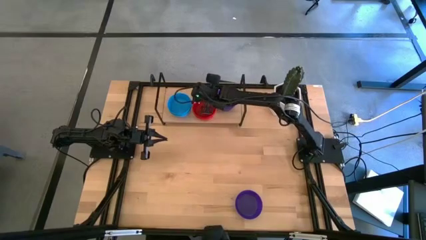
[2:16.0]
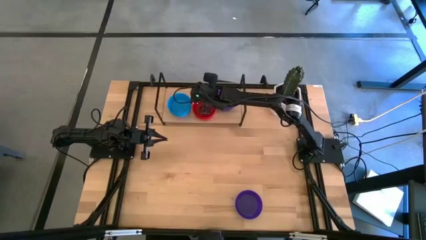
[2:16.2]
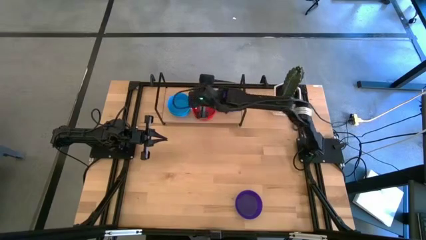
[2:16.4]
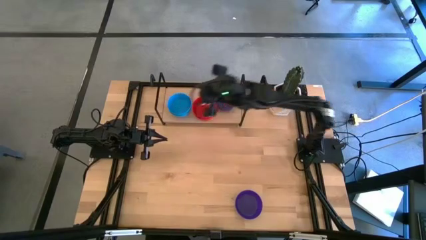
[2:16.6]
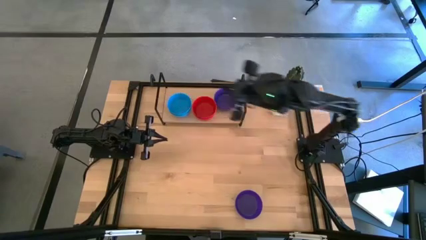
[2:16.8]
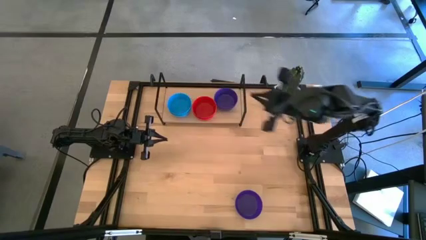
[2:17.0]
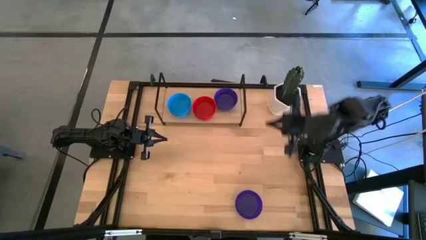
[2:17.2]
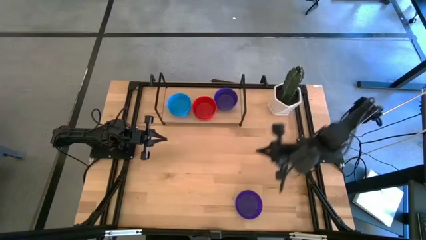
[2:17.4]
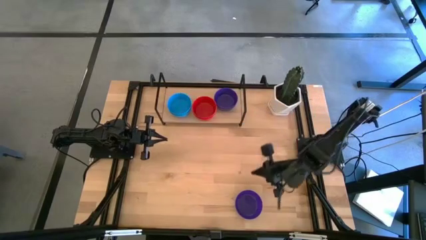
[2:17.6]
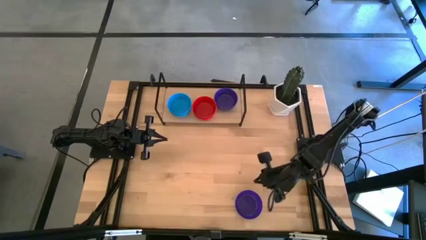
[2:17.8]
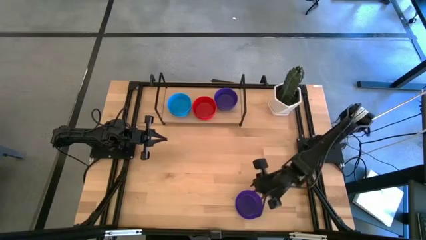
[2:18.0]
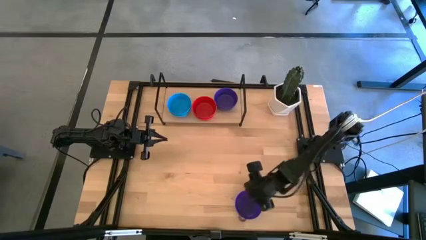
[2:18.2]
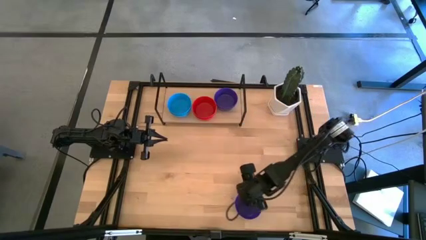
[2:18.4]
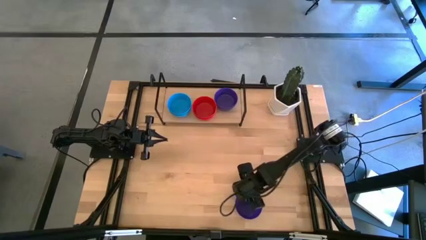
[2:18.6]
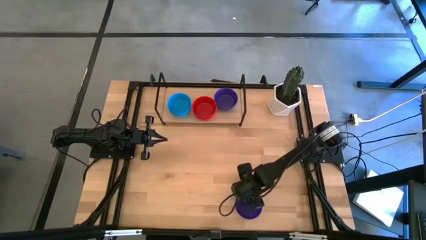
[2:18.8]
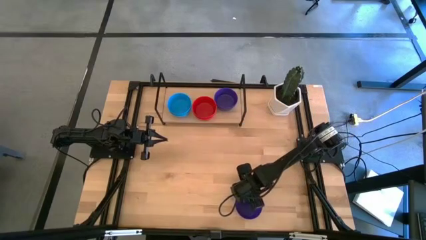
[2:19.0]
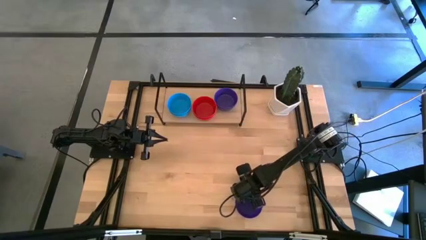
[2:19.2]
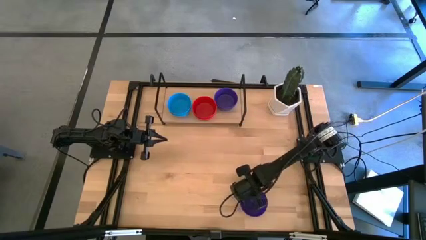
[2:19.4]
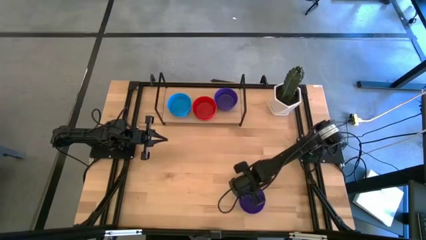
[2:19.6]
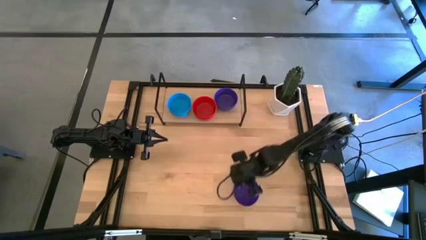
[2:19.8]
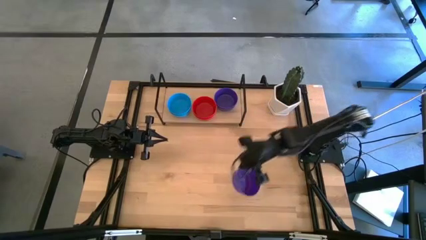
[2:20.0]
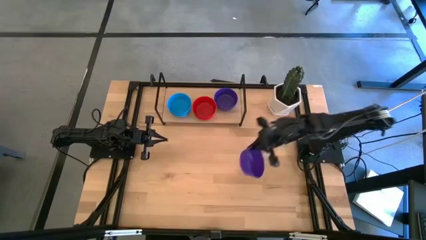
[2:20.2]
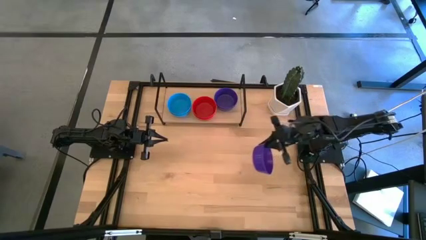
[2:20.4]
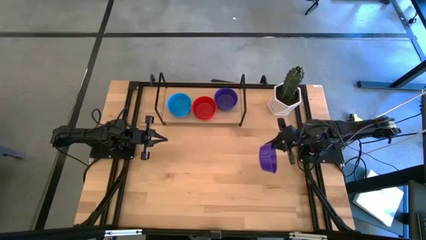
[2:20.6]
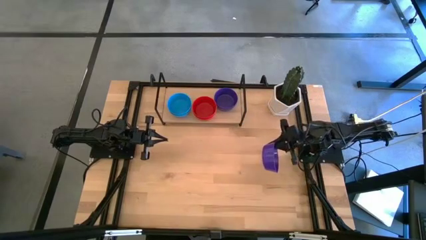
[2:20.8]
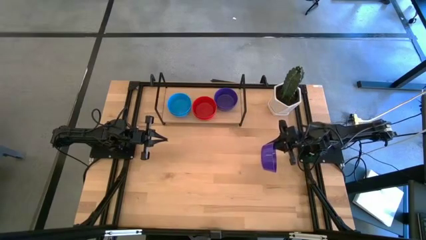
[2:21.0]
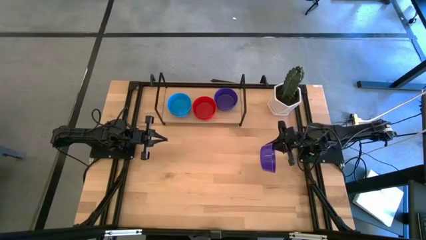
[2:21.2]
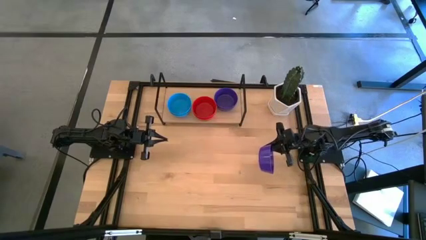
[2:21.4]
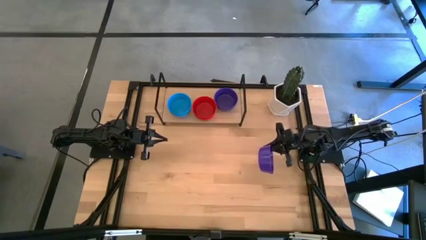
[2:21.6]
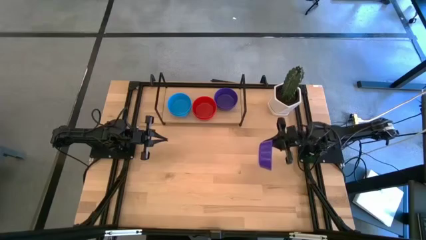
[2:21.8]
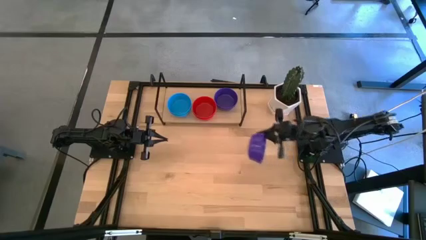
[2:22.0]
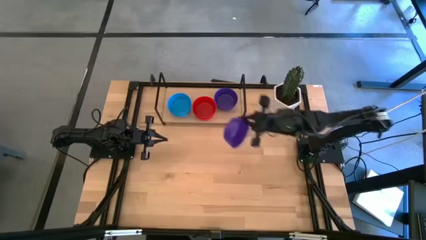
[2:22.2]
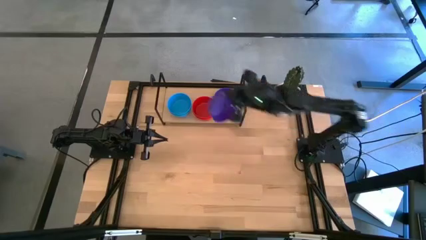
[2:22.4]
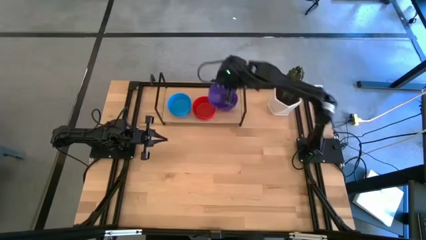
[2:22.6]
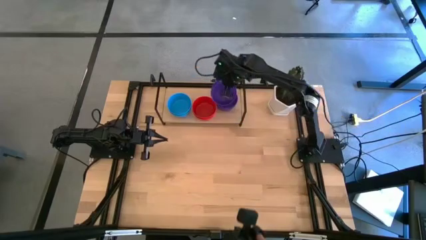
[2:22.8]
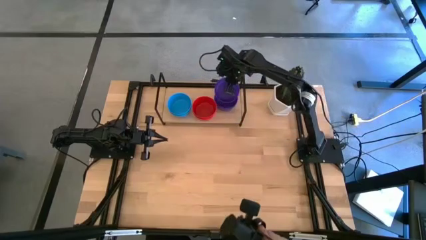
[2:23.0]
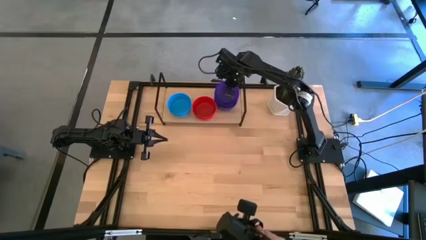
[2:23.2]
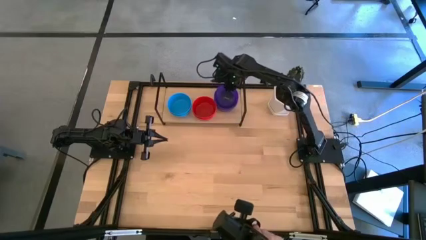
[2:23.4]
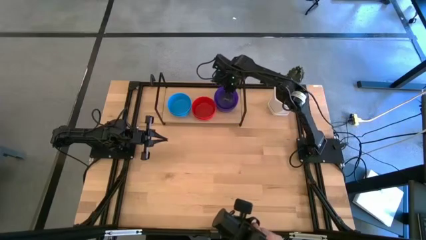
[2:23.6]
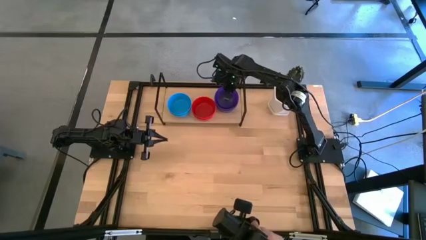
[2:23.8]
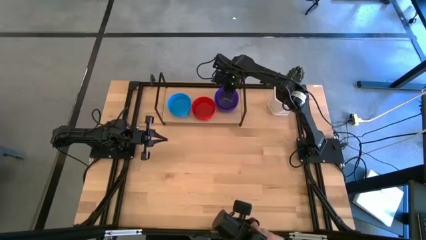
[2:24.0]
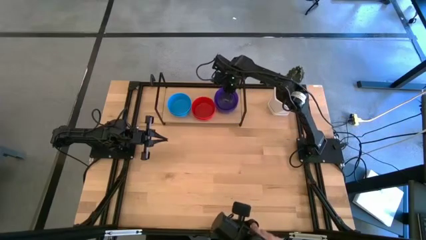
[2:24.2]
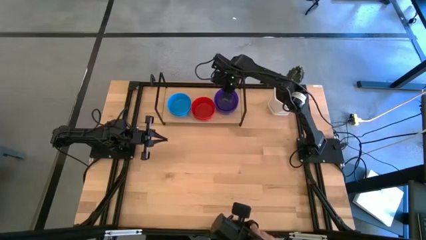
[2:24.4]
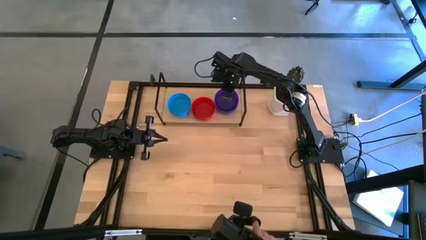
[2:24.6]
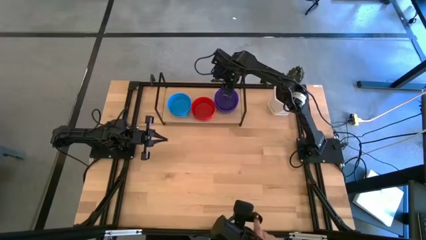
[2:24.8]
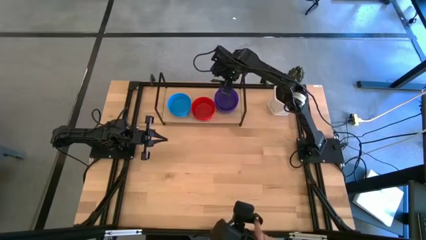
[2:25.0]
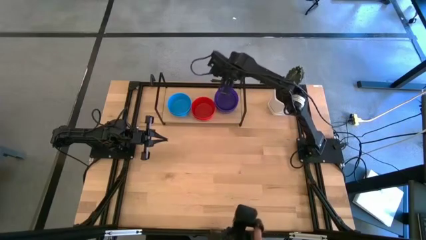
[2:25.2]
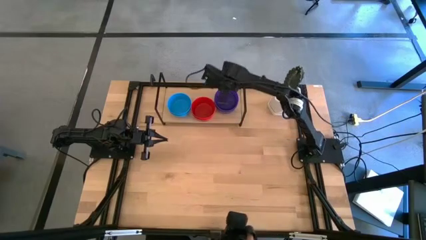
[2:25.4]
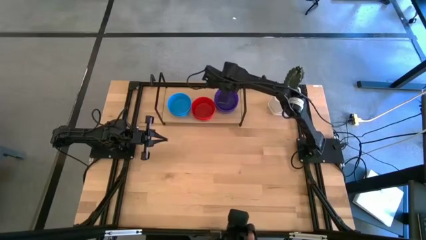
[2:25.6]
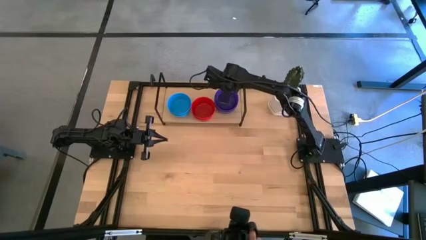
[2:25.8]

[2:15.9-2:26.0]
Task: Pick & Place Mini bowls
Stack the violet bowl on top of the violet bowls on the shelf

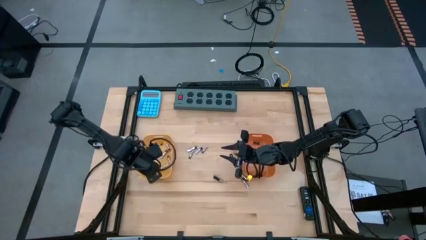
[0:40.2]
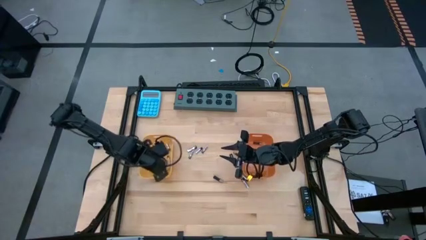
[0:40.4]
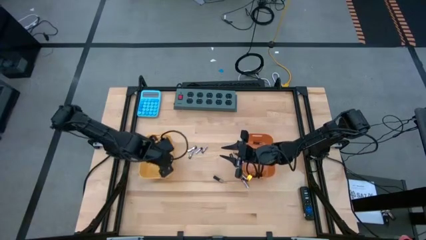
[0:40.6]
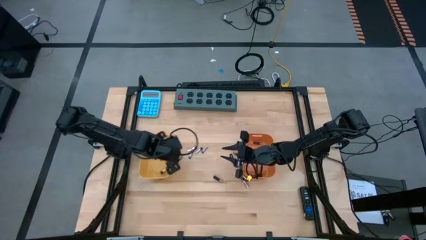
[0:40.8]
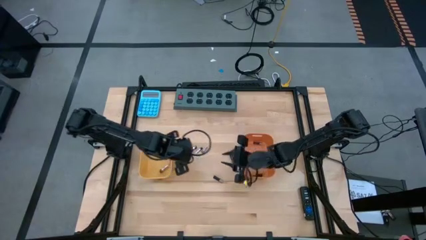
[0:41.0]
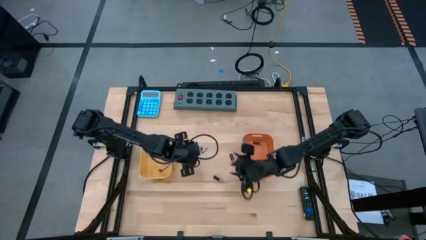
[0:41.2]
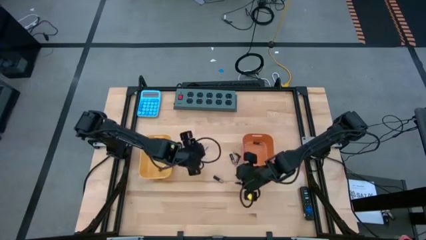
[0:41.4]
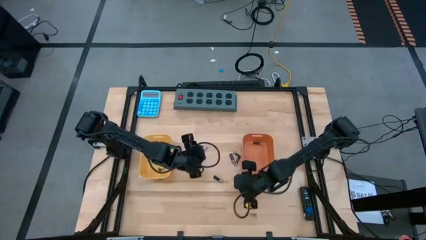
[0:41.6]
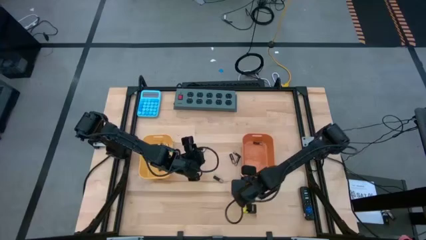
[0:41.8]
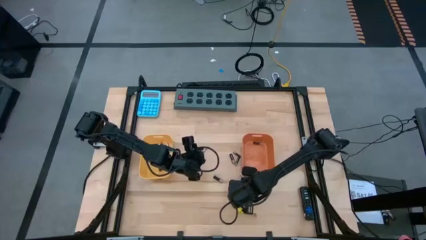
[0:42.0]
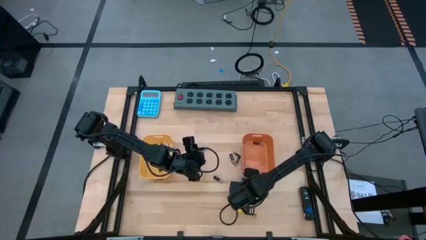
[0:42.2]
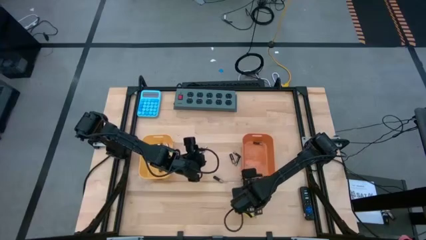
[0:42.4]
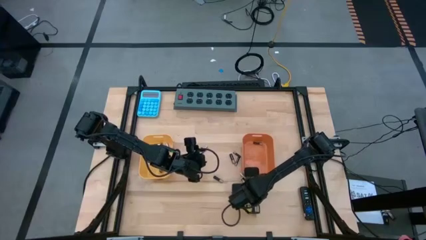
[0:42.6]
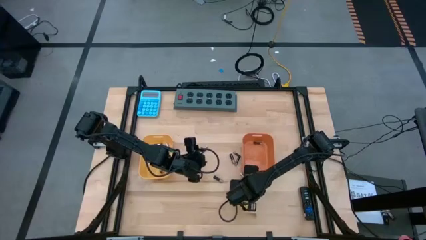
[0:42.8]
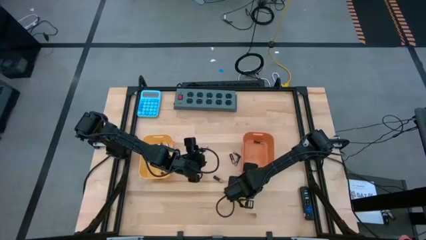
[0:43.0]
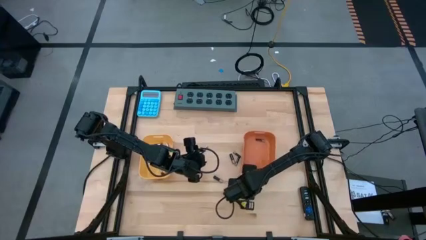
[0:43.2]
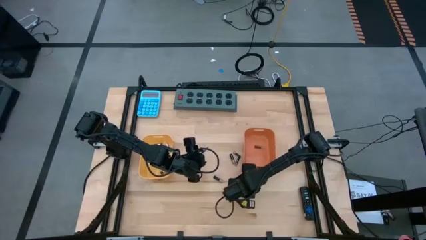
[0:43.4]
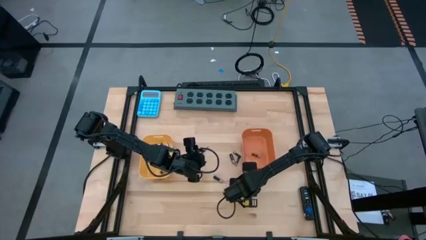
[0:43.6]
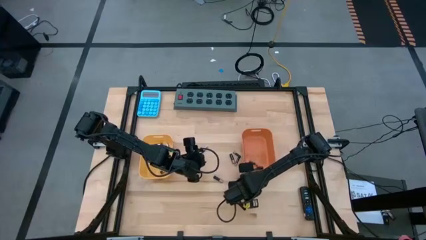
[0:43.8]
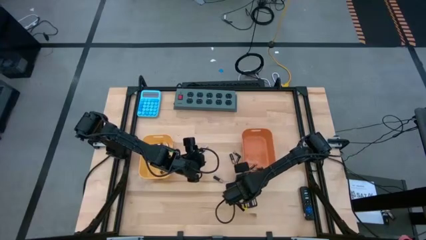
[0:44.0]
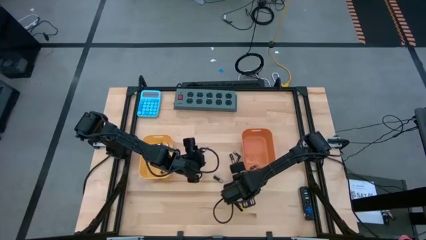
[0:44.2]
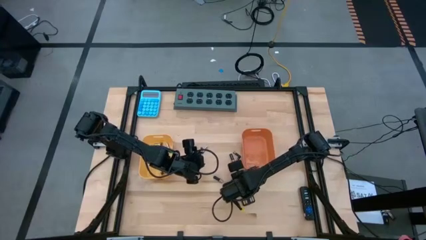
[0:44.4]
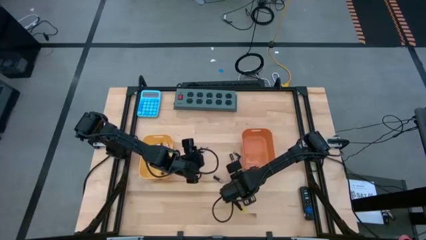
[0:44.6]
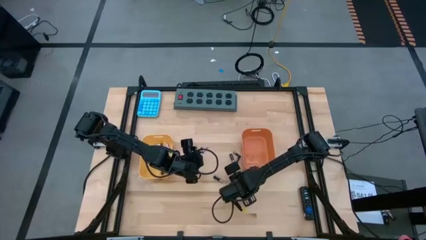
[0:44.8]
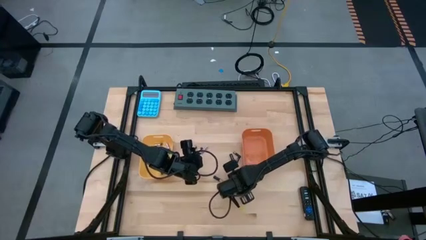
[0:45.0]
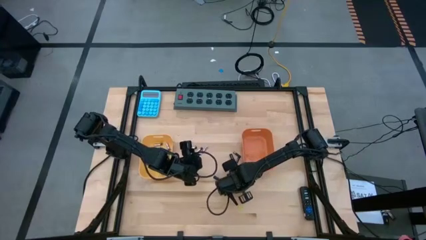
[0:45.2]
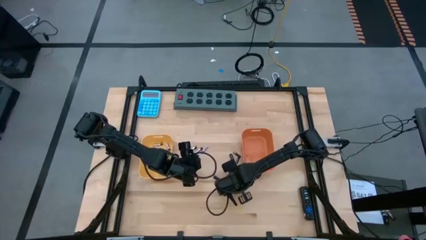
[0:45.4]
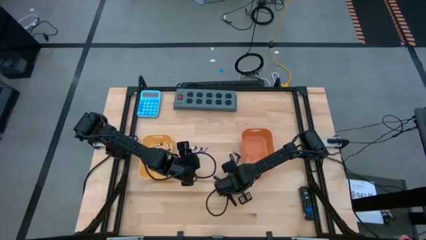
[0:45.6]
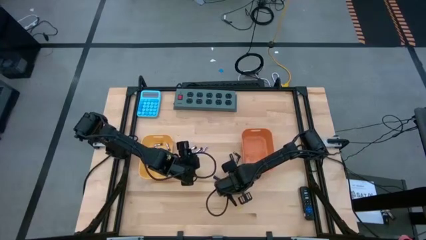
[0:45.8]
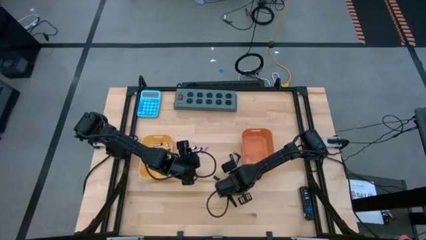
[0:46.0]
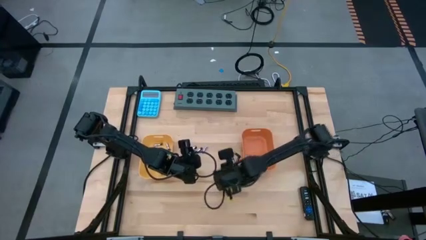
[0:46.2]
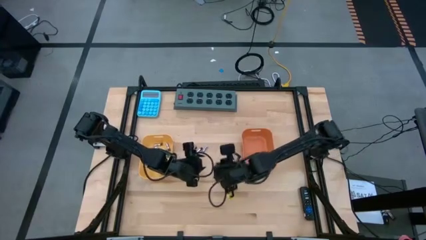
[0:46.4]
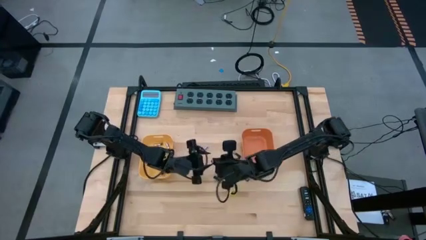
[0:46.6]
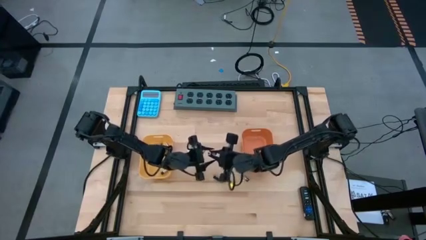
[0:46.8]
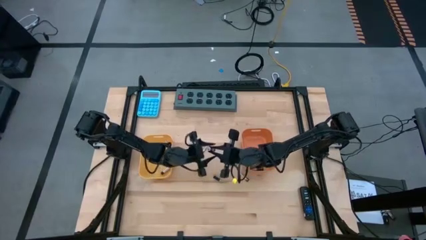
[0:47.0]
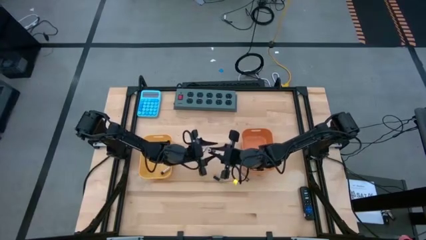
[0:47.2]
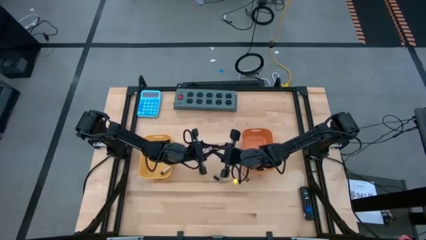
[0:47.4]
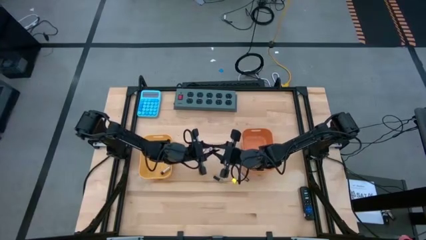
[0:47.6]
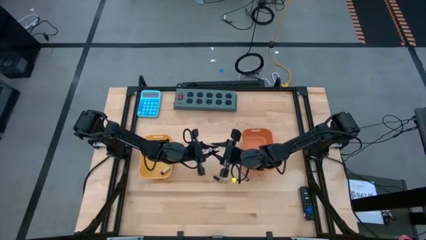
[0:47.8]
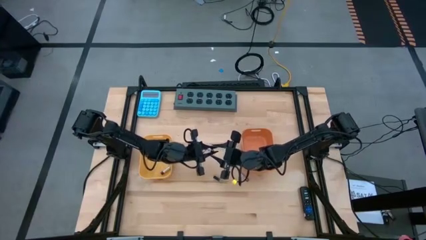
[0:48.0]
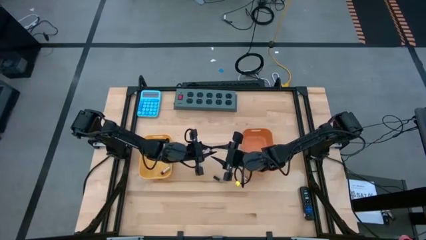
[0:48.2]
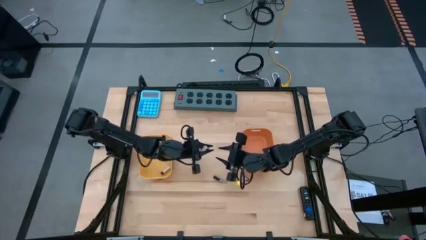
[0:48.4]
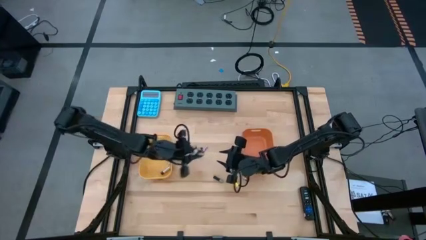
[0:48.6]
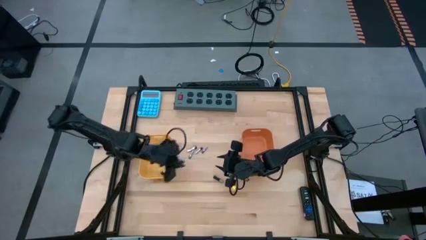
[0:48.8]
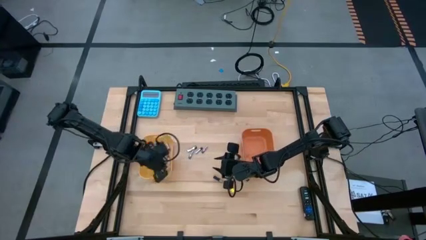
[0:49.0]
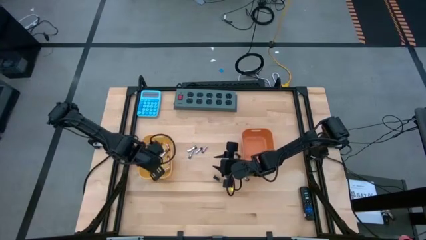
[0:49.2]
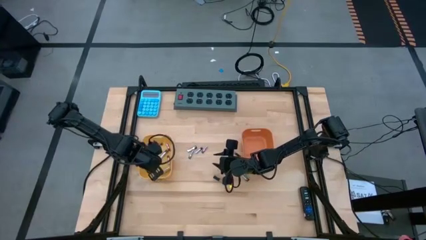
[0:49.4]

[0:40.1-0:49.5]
Task: Sort batteries
Put the silver battery into the yellow bin
